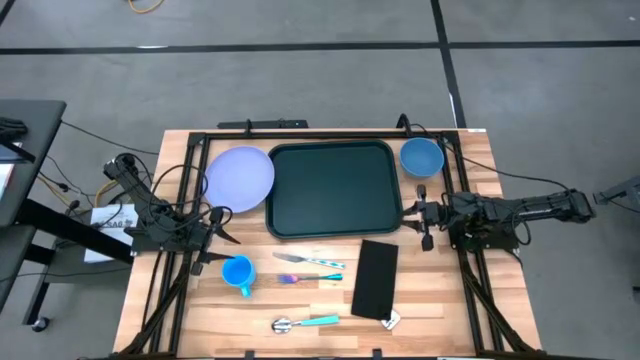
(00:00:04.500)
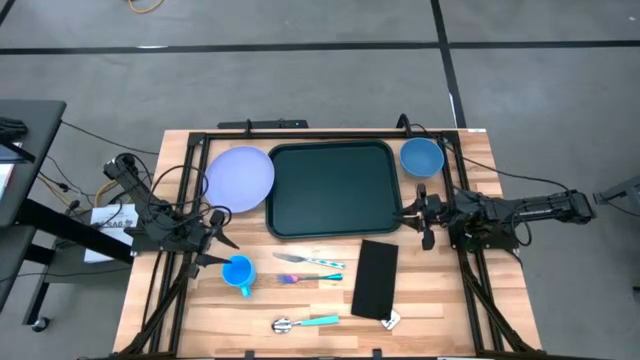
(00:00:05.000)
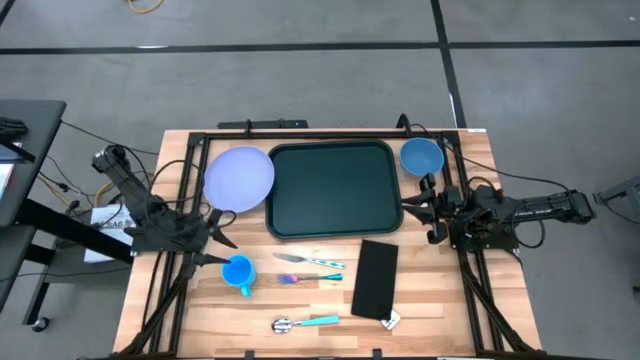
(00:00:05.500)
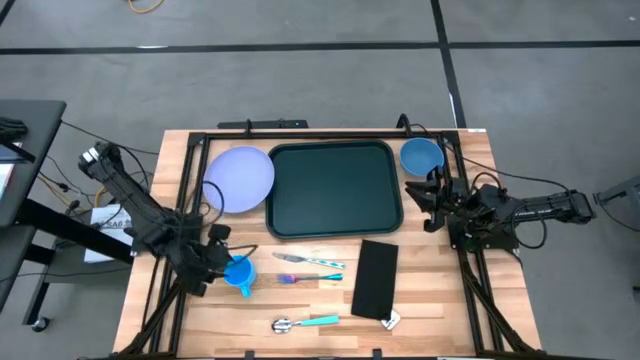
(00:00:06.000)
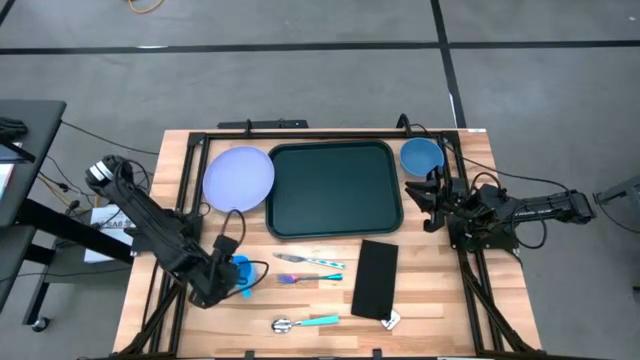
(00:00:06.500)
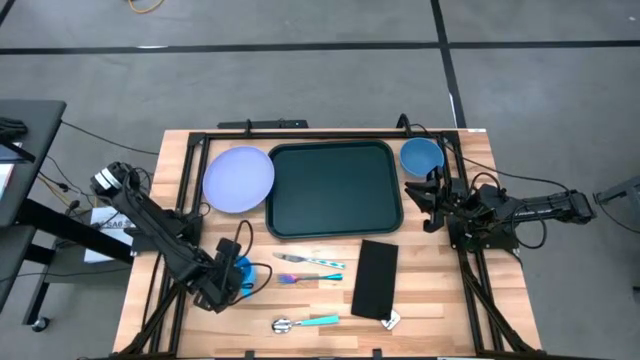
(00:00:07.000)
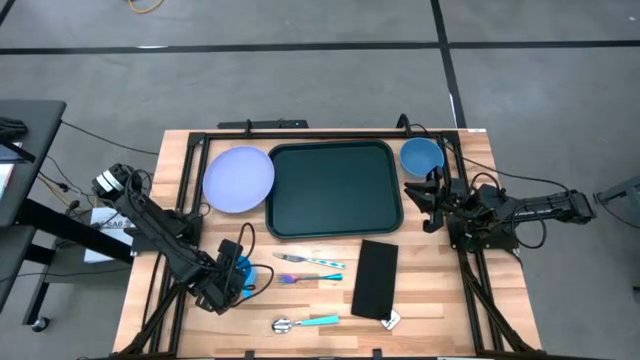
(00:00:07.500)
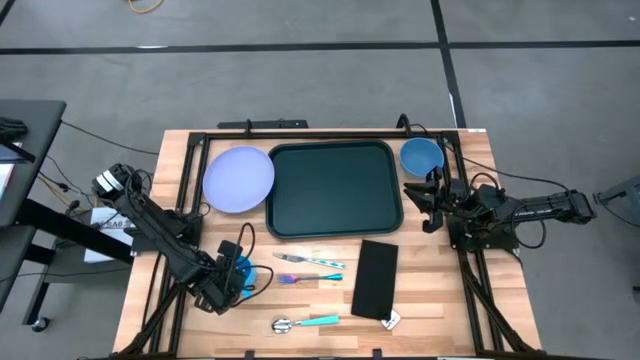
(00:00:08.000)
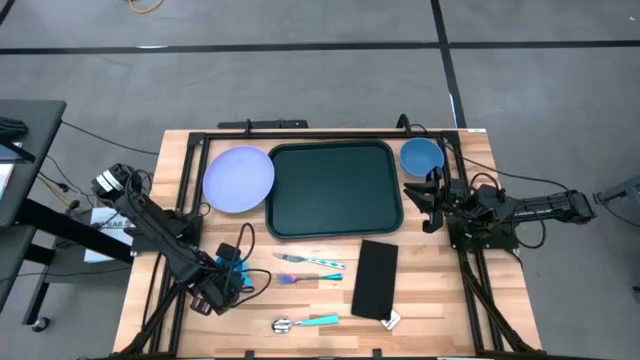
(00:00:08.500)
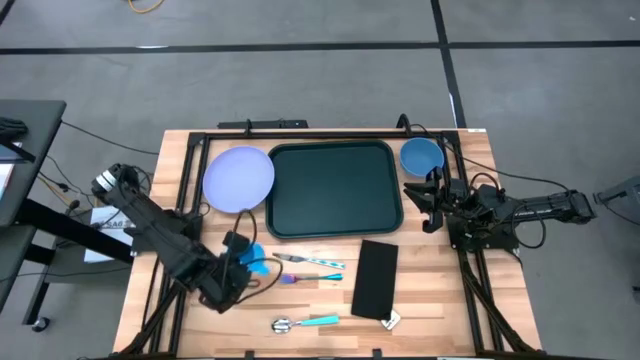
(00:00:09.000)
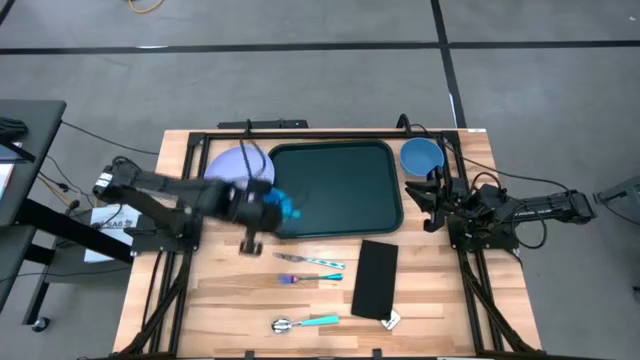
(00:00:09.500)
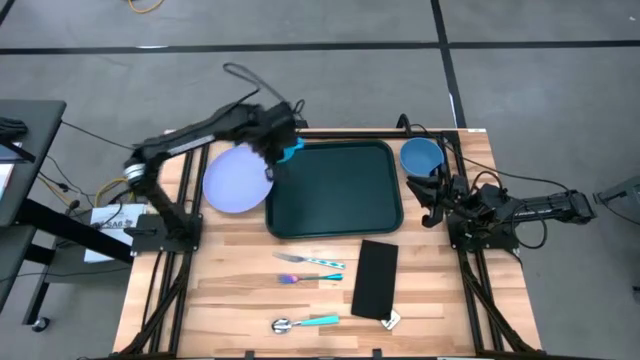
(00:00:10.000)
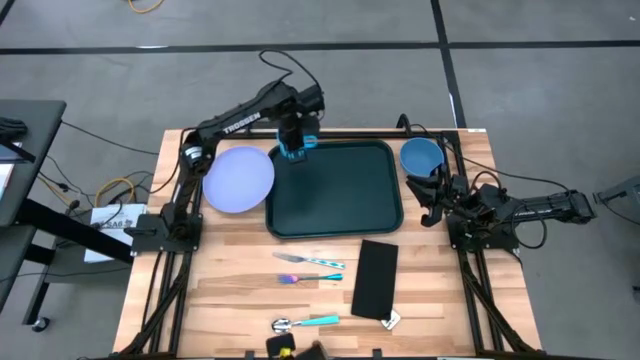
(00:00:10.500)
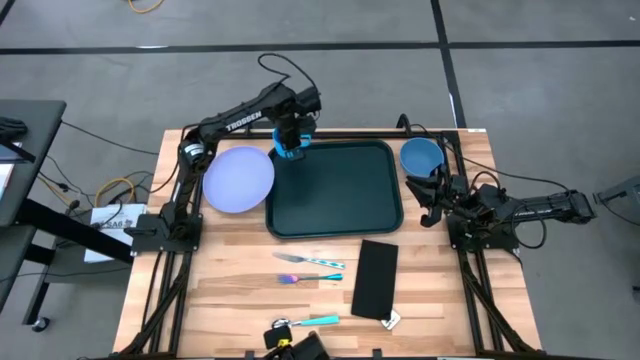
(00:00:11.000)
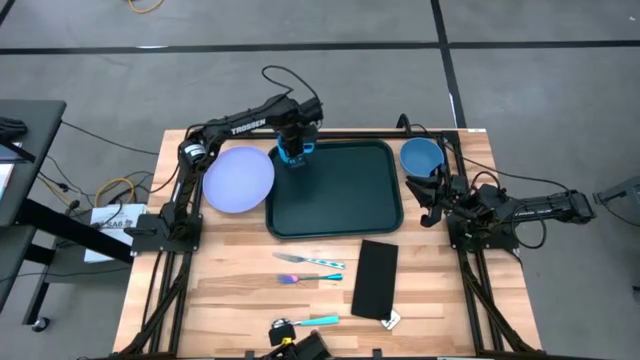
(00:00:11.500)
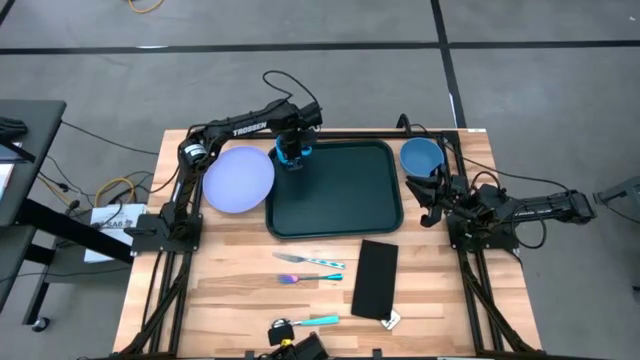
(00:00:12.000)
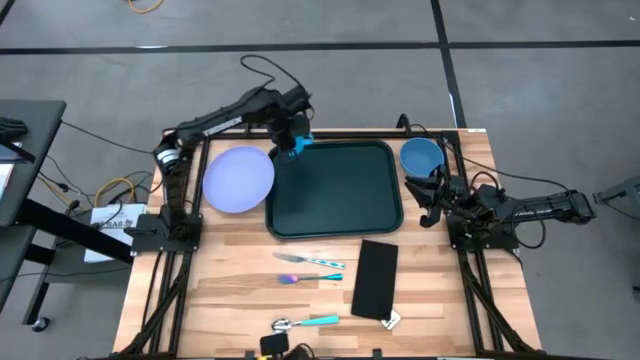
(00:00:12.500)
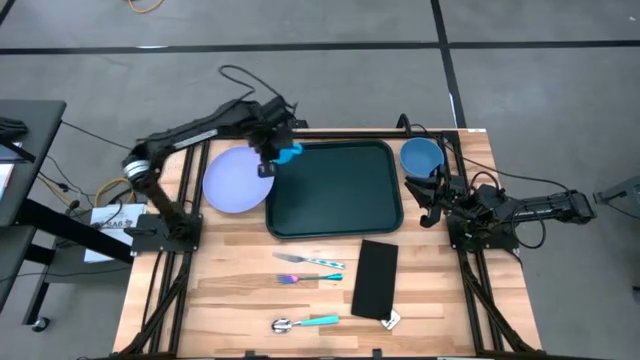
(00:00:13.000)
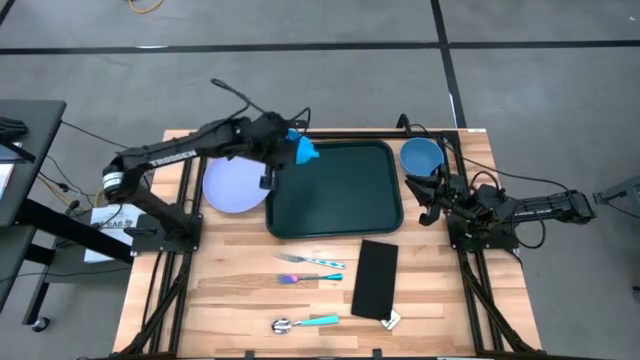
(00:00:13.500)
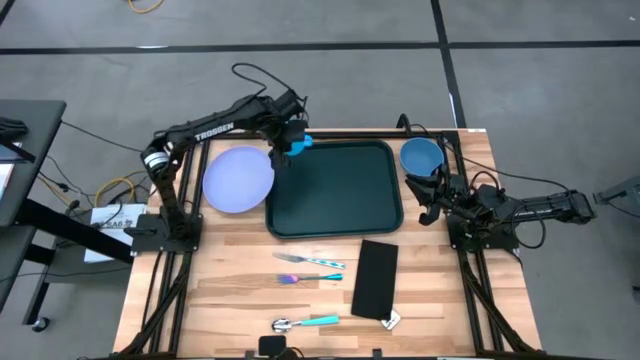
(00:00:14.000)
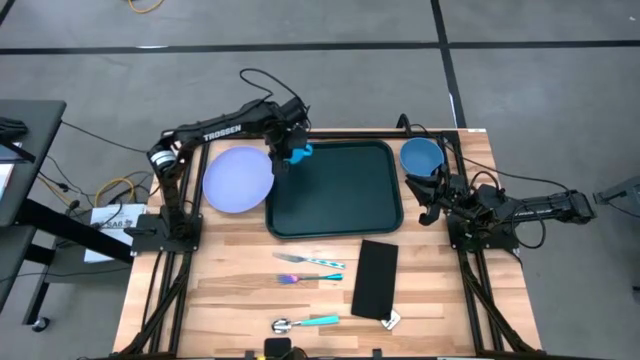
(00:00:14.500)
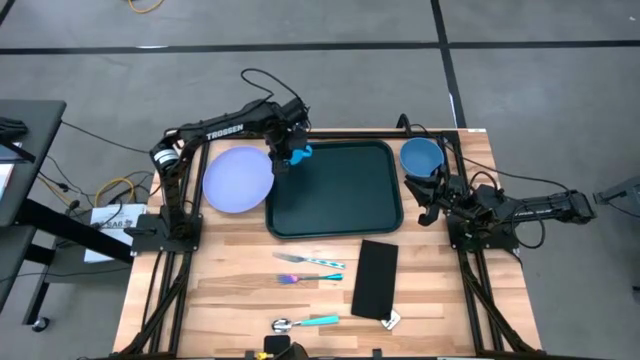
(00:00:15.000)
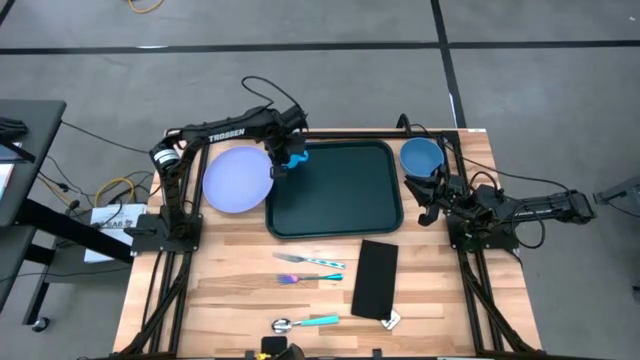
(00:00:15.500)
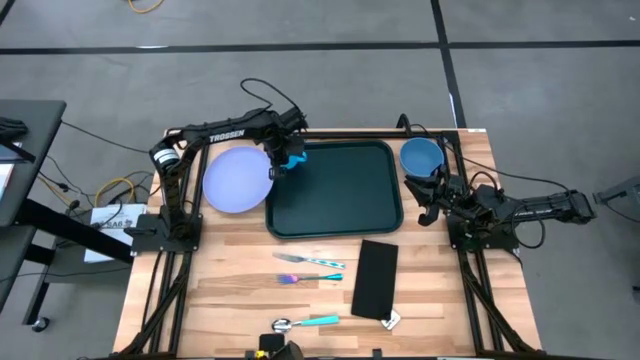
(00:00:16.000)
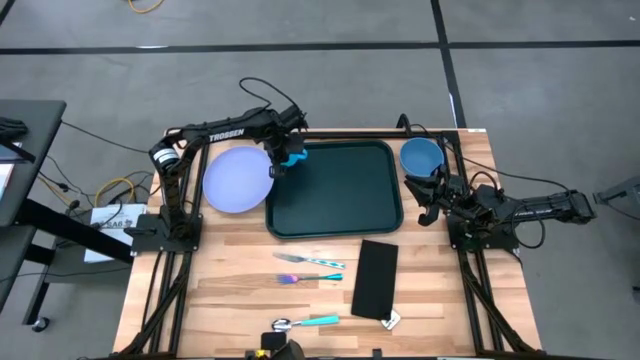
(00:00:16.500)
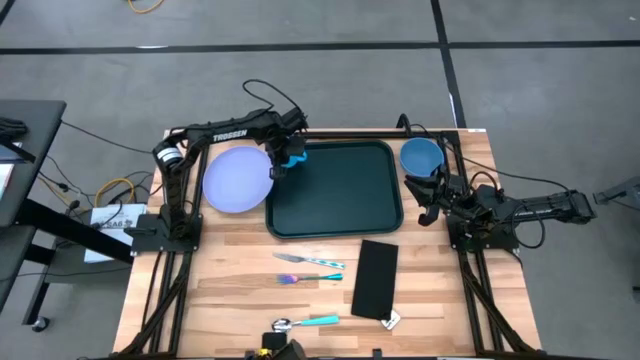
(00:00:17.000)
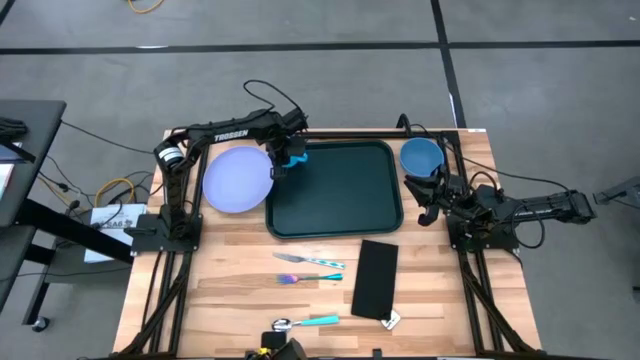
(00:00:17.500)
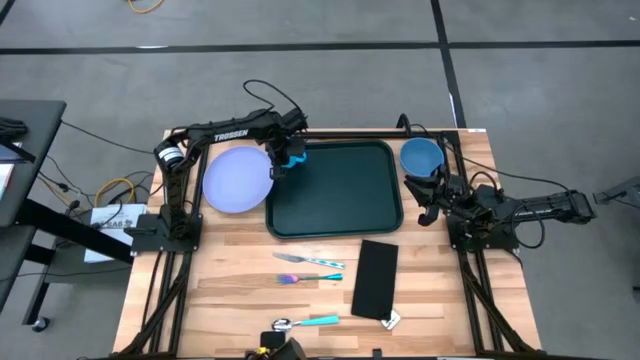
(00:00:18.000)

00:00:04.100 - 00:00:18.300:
Task: Set up tray
Put the blue mug on the black tray
